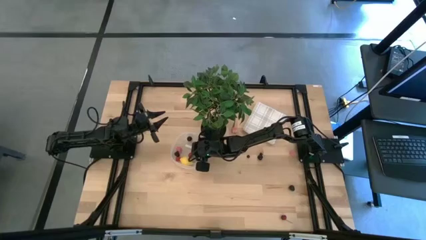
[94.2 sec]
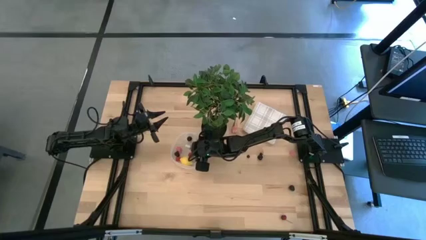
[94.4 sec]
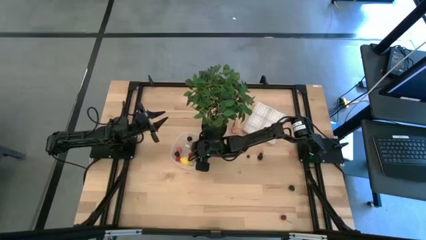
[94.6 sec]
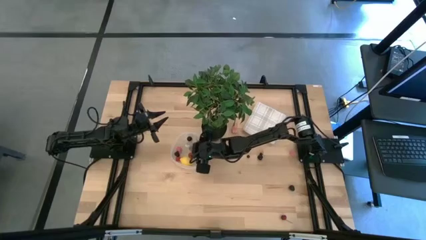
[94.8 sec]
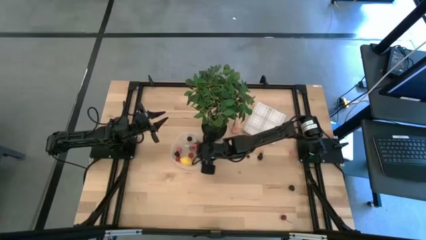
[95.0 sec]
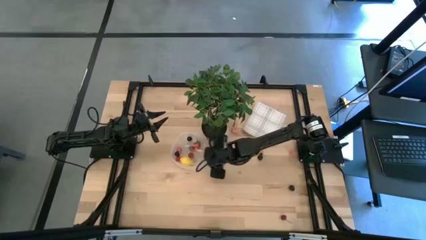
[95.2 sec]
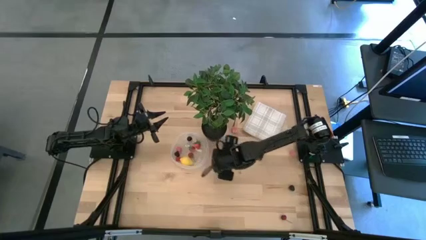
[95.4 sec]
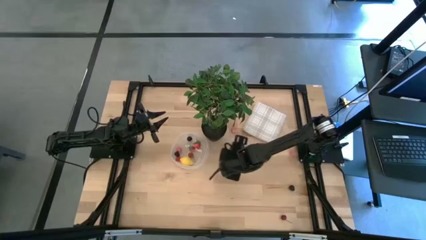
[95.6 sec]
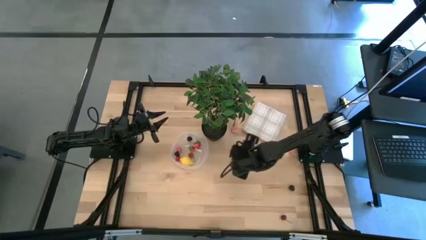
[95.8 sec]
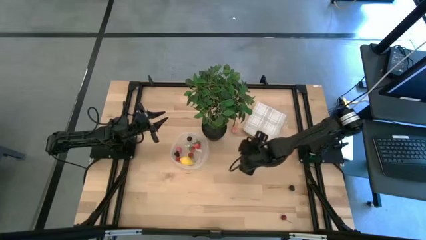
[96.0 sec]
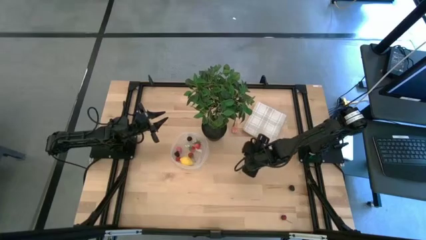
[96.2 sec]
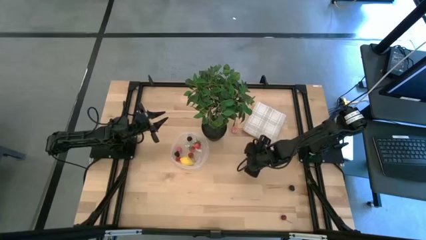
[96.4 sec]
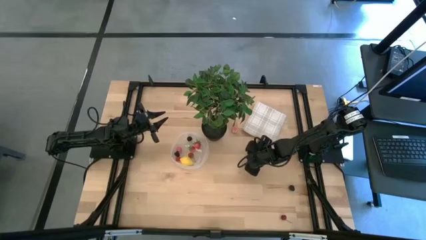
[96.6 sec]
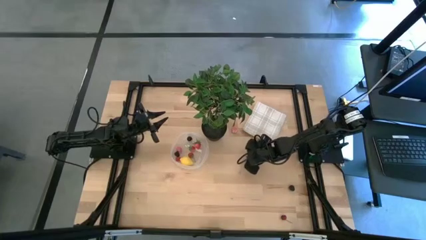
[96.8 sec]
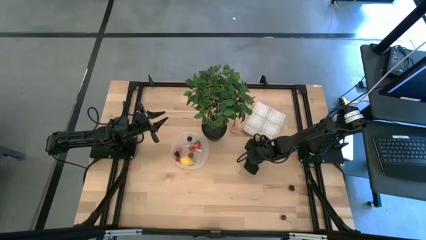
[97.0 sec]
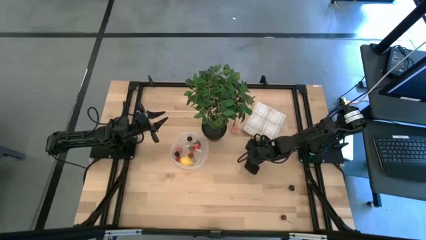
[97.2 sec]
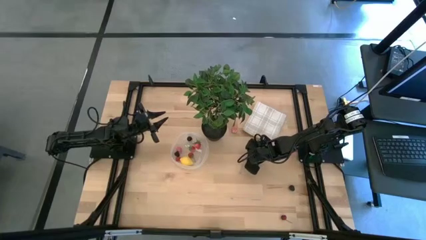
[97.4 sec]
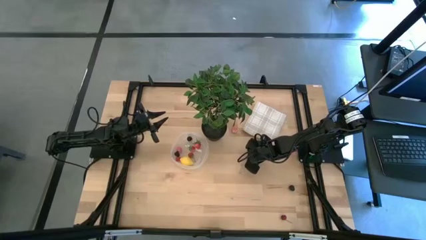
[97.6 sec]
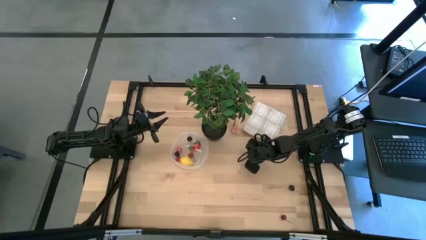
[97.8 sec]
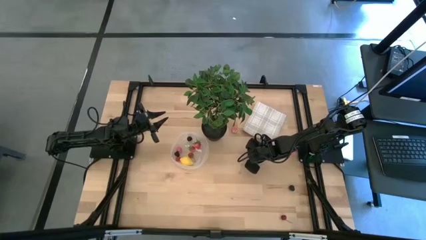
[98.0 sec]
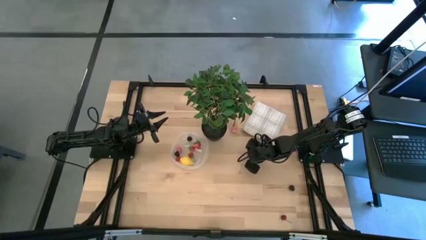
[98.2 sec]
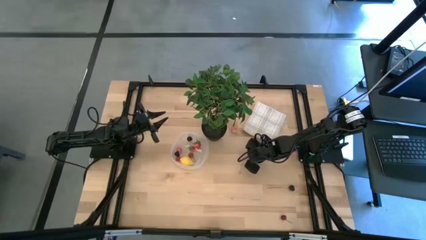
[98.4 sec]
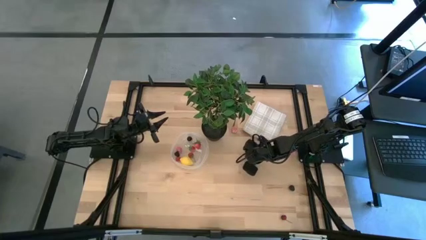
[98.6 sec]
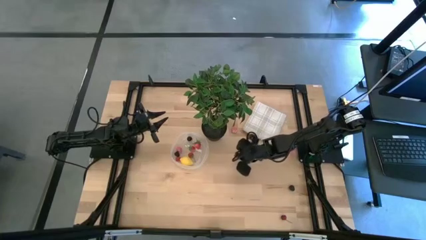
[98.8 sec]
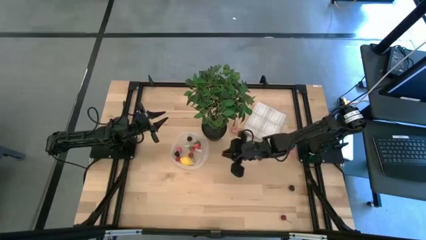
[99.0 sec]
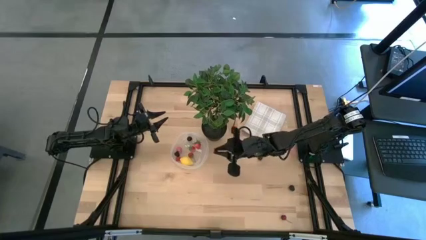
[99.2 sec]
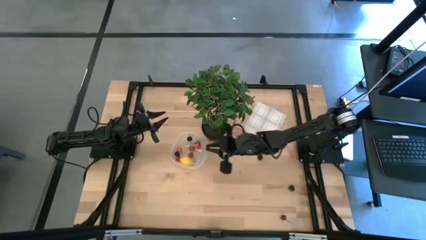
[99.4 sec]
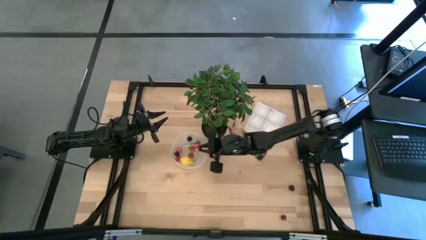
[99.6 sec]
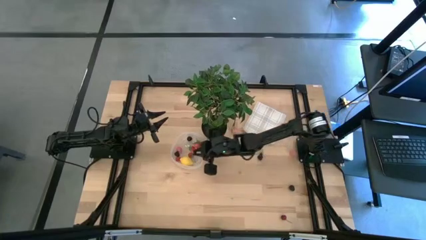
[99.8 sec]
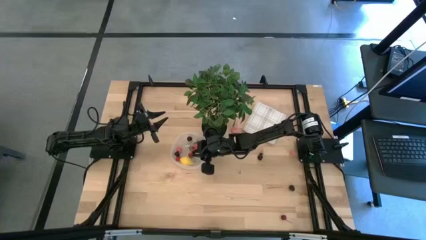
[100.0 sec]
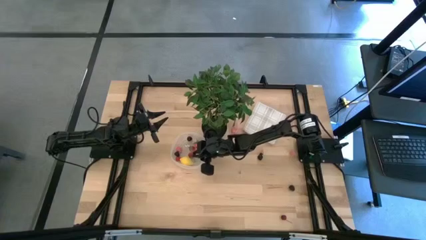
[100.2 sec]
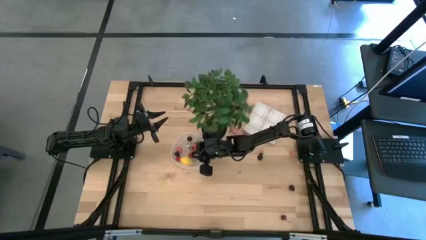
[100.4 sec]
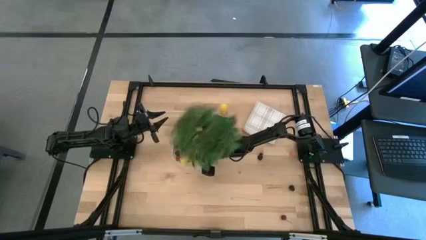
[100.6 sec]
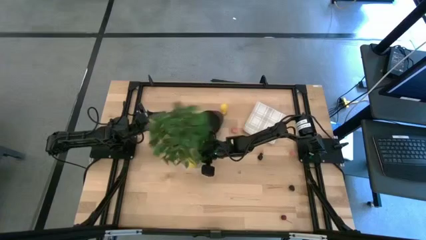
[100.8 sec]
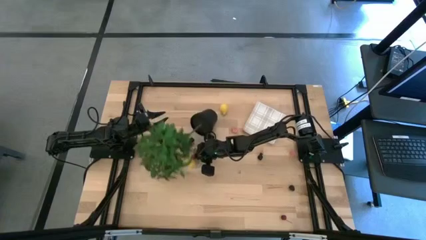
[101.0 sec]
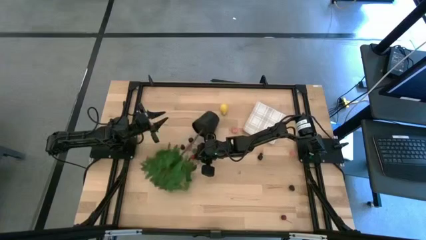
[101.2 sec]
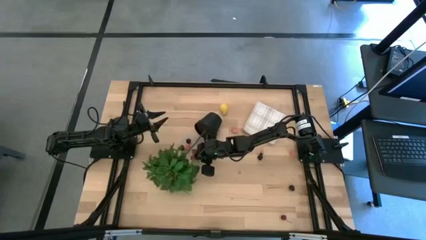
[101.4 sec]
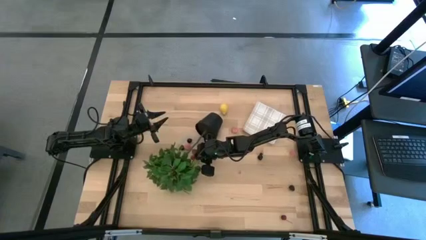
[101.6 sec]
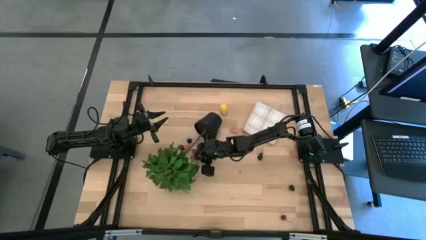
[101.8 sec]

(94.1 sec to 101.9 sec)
Task: Pick and placing Produce into tupperware
Put the left blueberry into the transparent bin

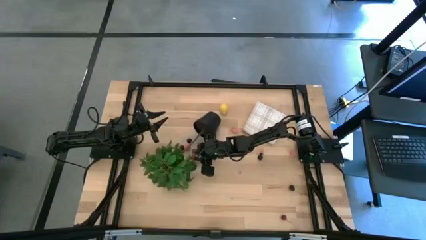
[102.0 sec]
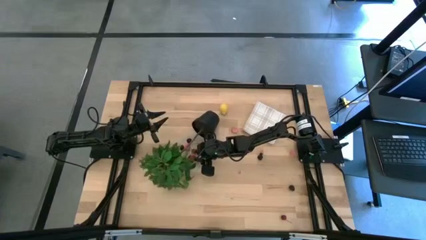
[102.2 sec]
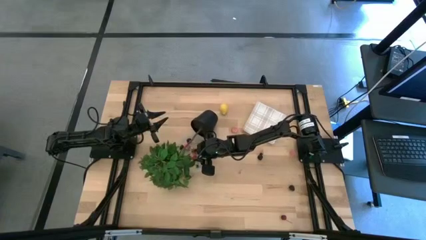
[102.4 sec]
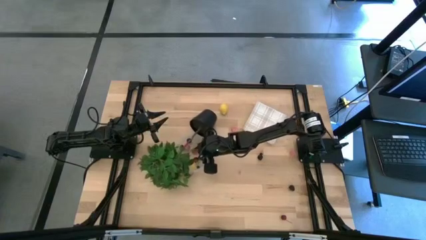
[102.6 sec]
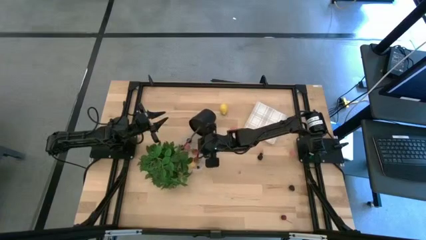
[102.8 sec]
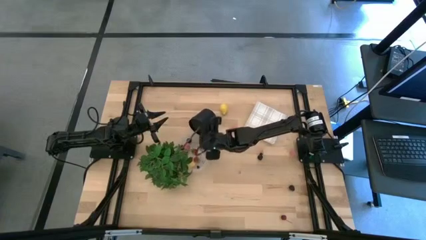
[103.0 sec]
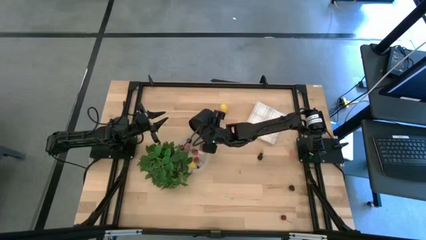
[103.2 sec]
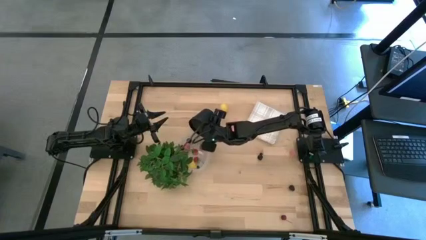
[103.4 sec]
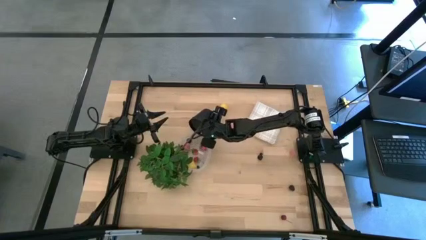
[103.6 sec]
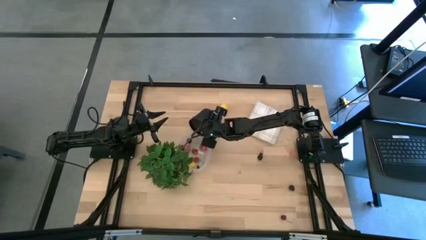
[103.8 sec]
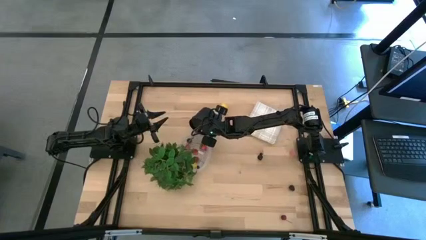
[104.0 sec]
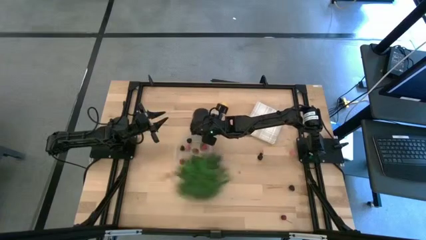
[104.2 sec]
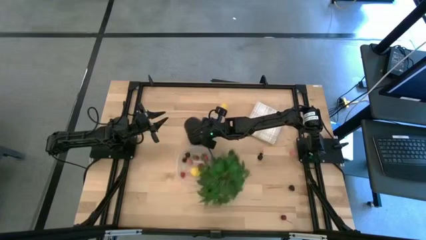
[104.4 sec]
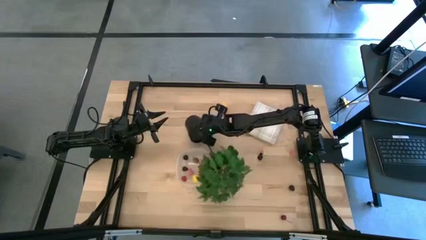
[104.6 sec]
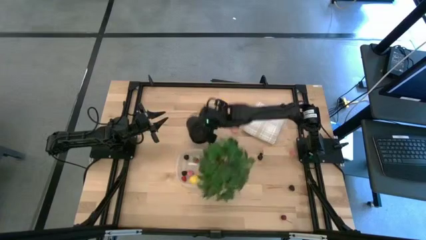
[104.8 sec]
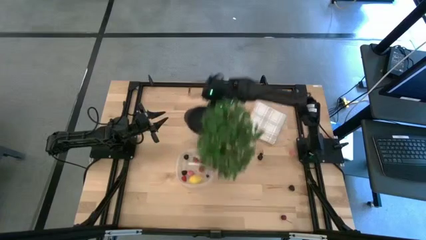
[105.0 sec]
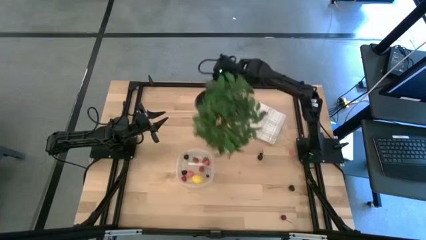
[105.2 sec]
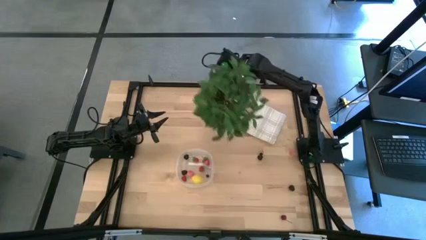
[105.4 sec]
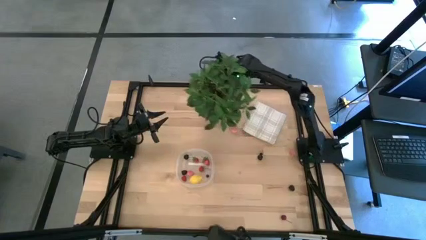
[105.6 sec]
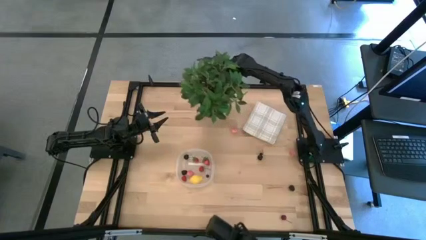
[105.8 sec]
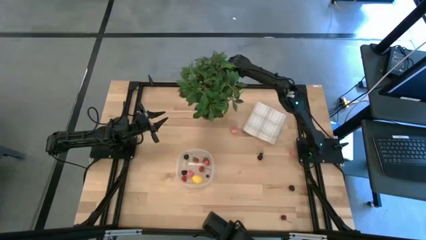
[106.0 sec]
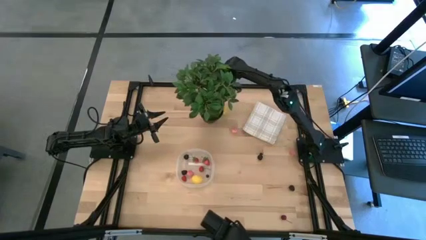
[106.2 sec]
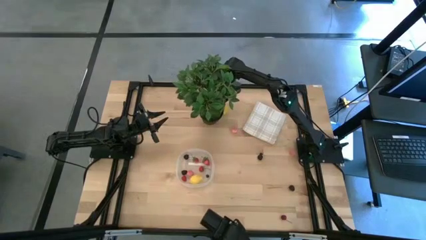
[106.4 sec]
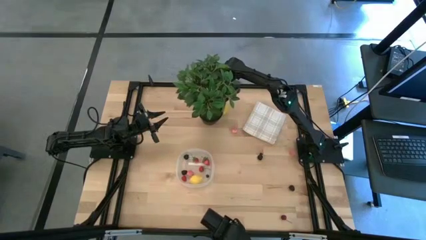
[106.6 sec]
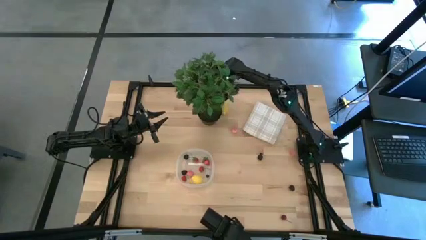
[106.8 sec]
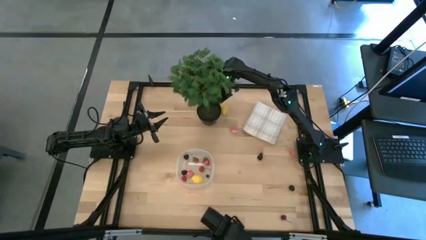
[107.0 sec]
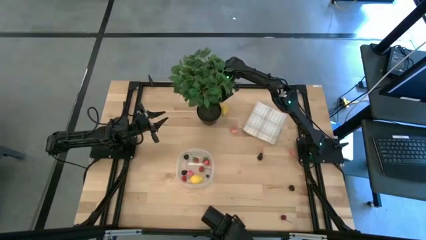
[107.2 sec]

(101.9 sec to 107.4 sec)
Adjust the black potted plant on the table
